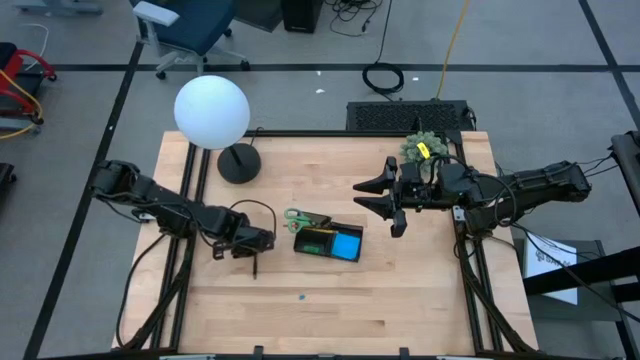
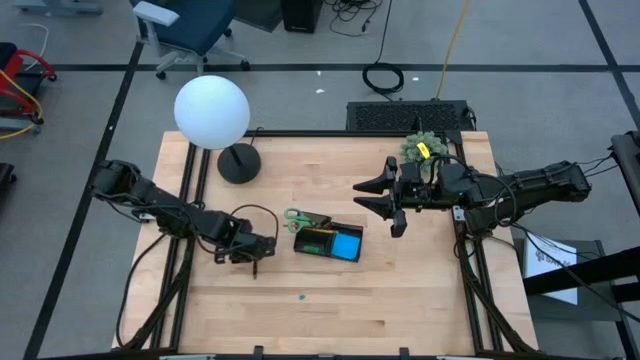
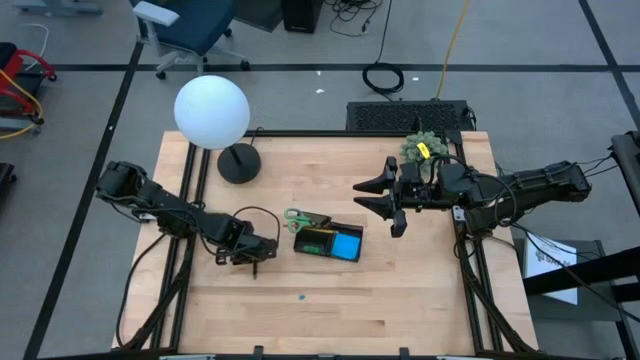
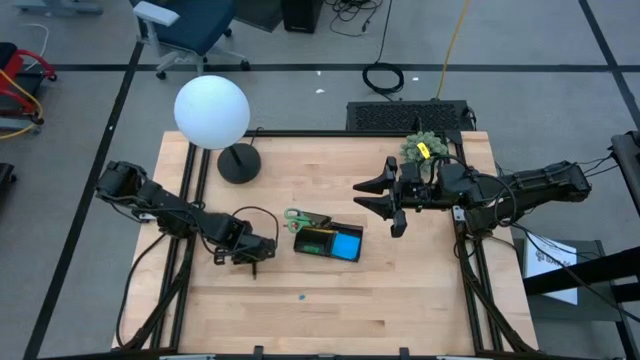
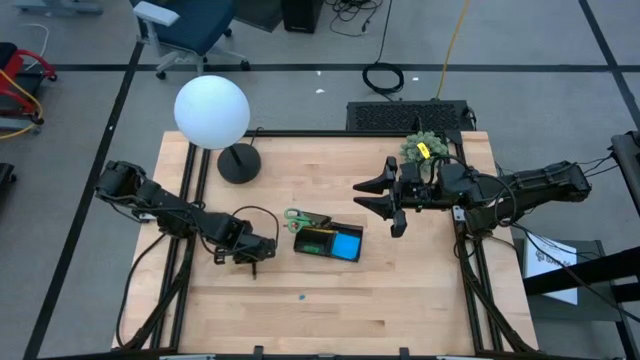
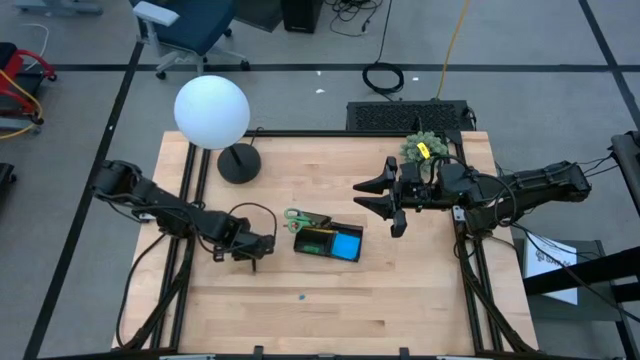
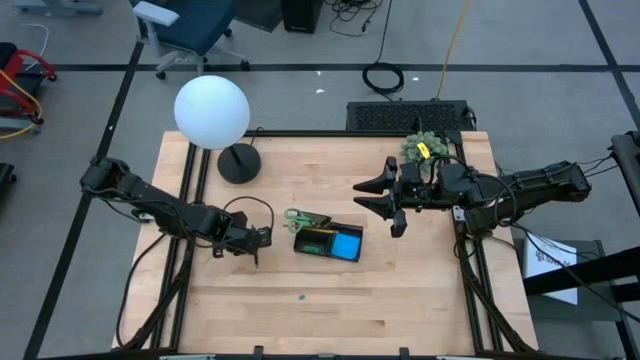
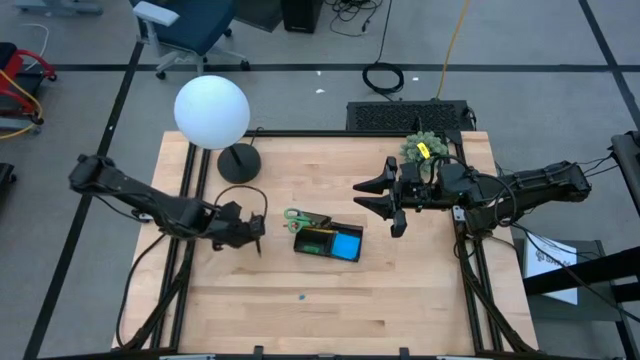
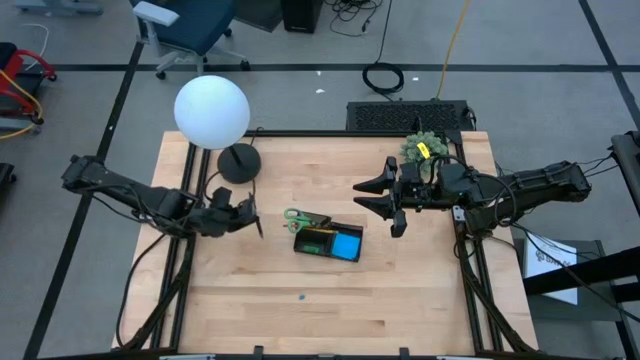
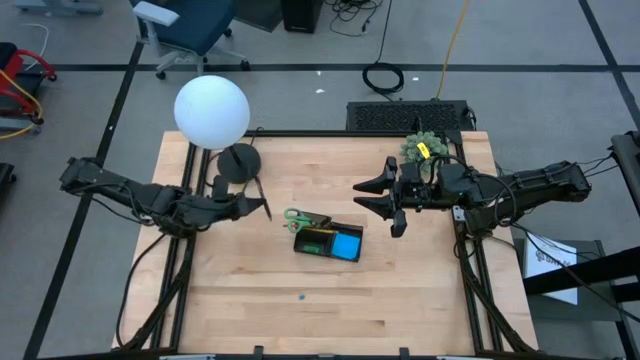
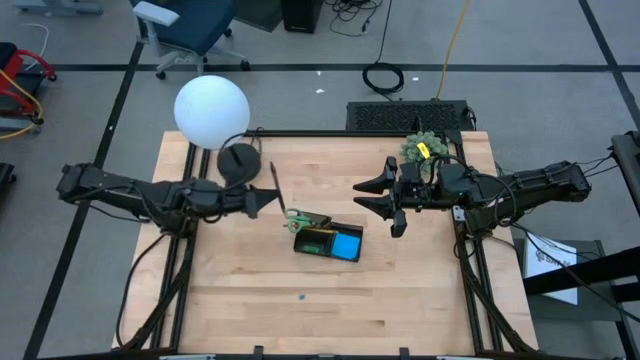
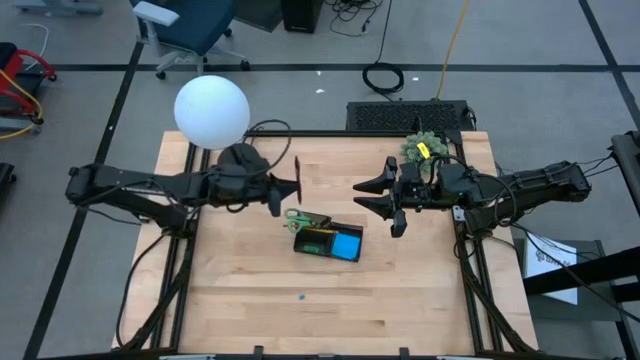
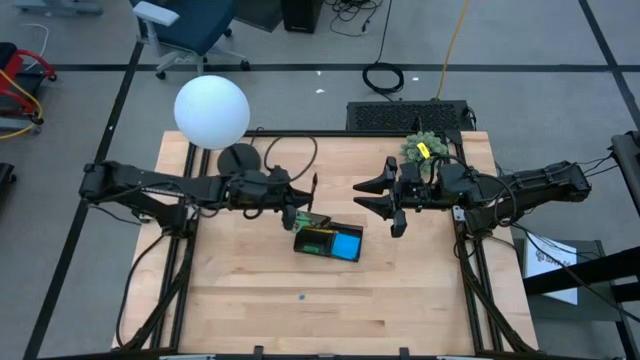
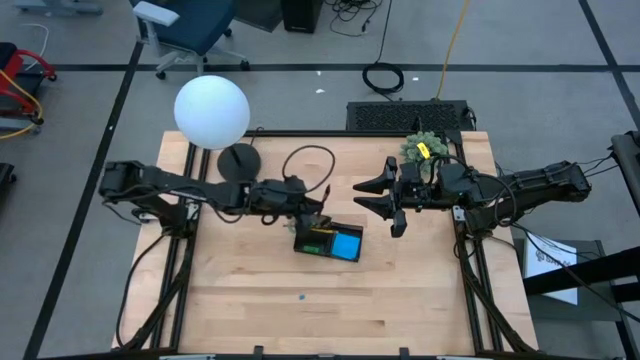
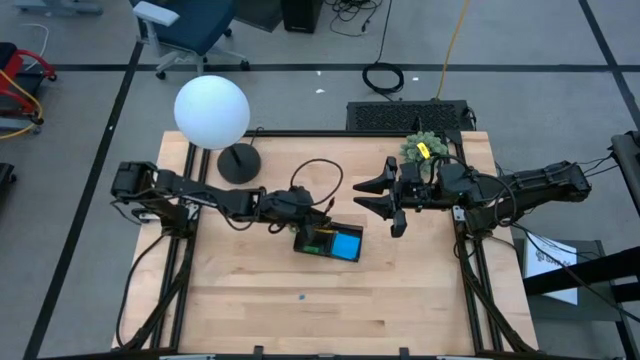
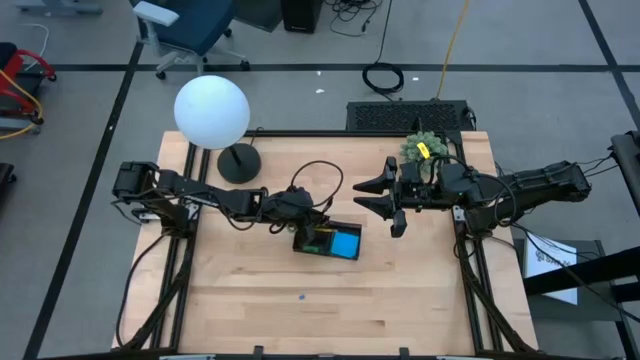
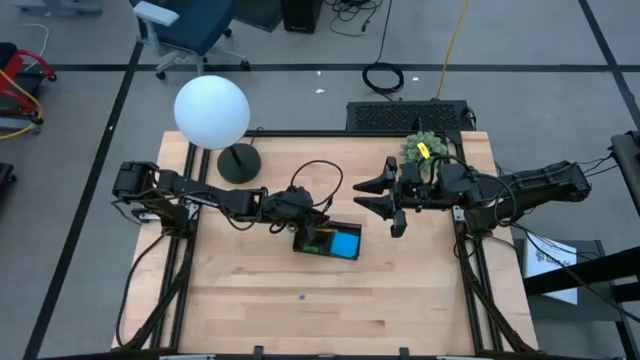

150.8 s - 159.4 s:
Task: Pick and place office supplies into organizer
Put the black pen into the desk organizer

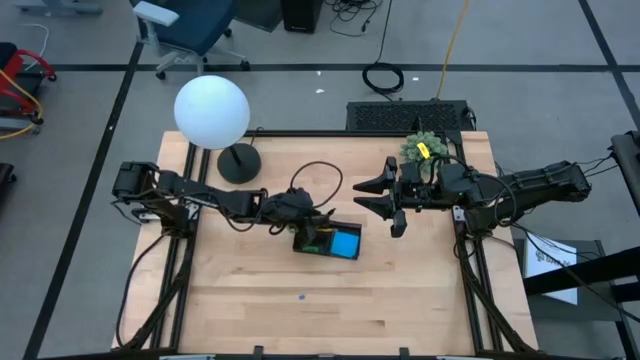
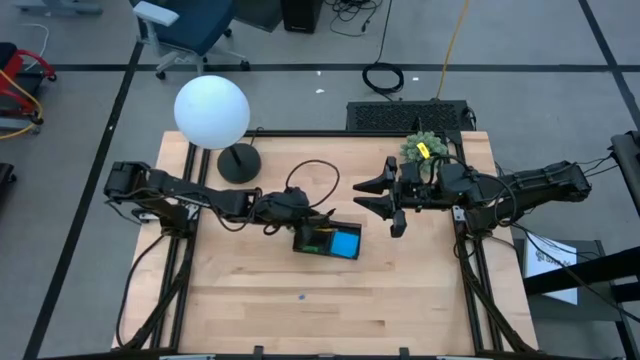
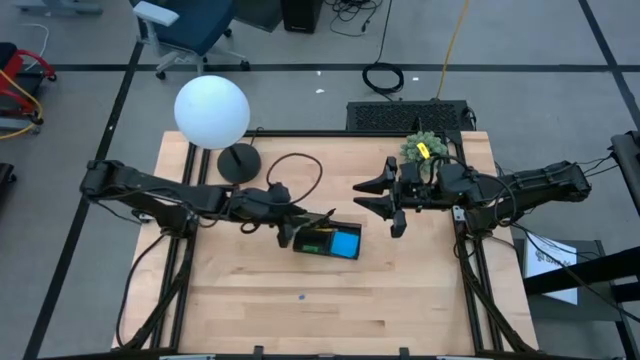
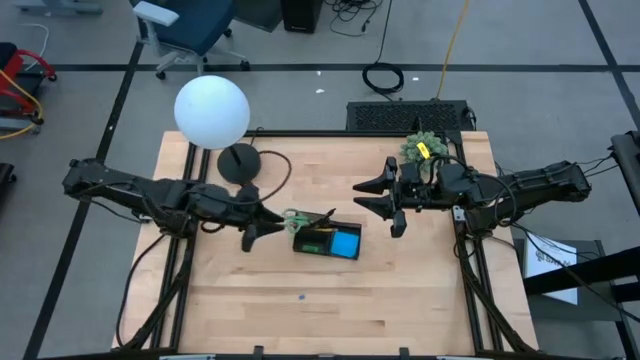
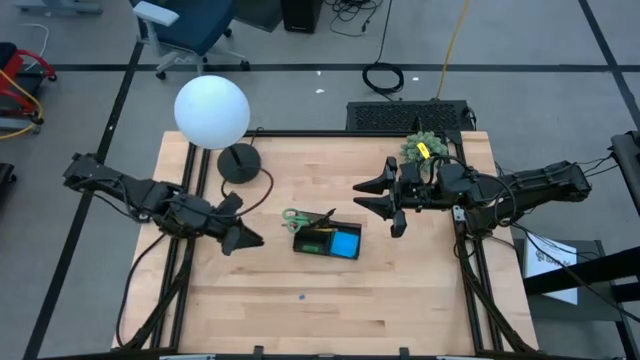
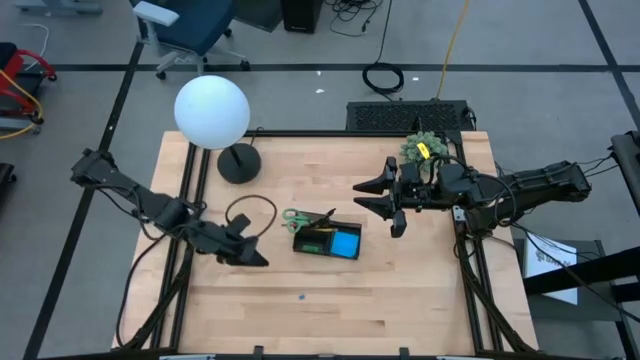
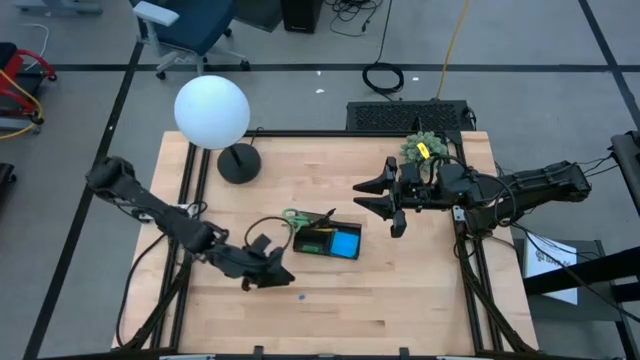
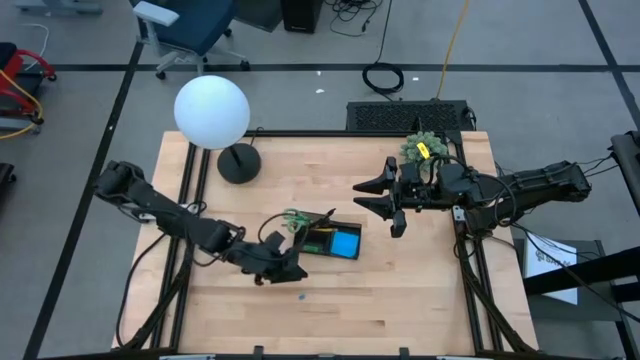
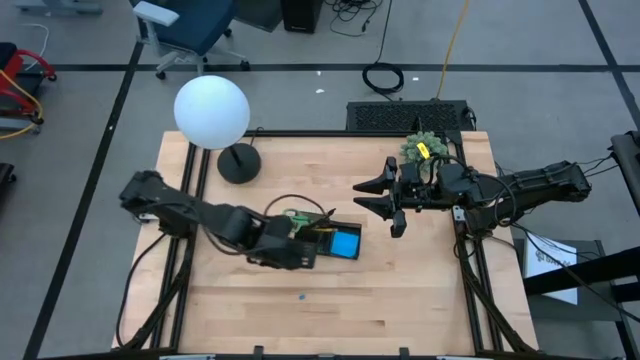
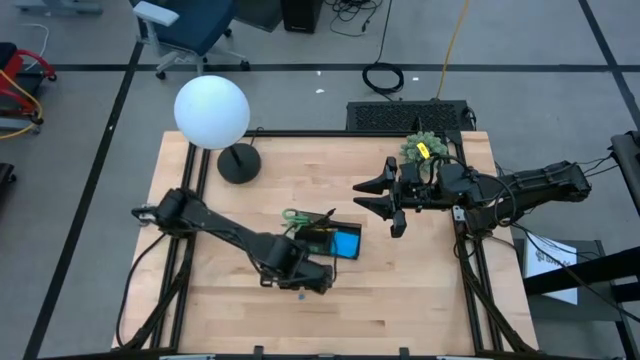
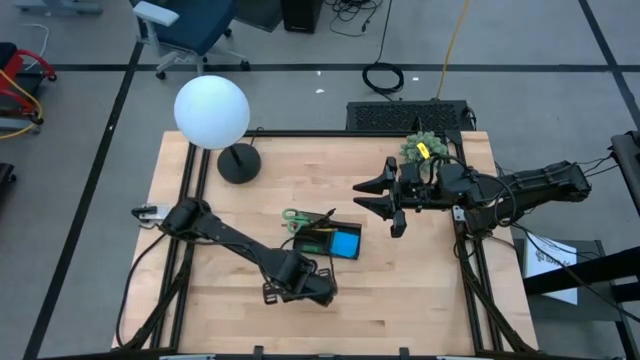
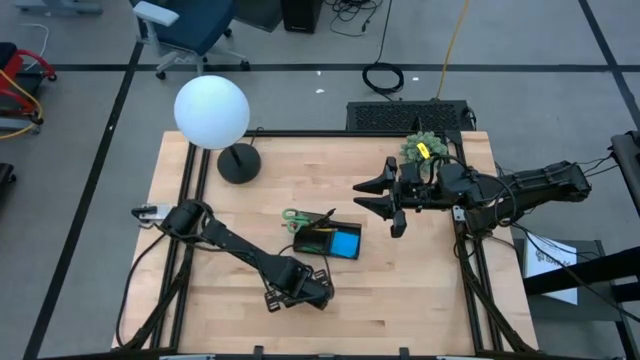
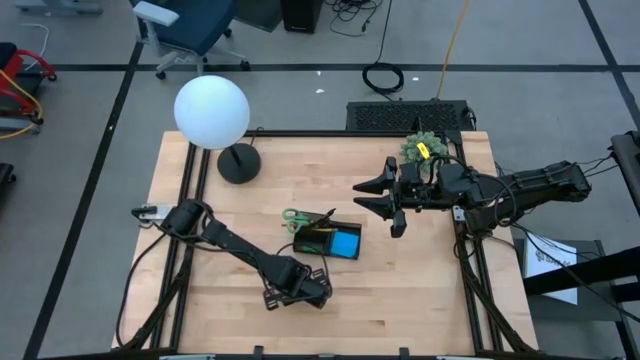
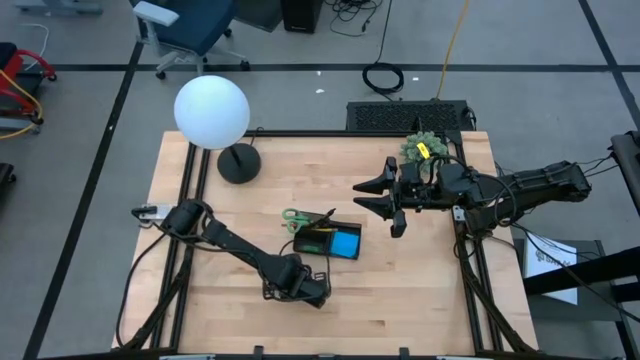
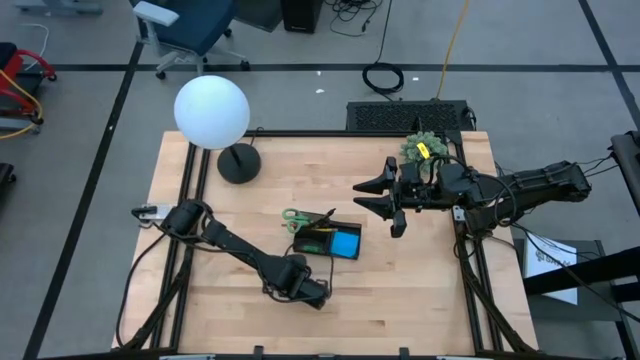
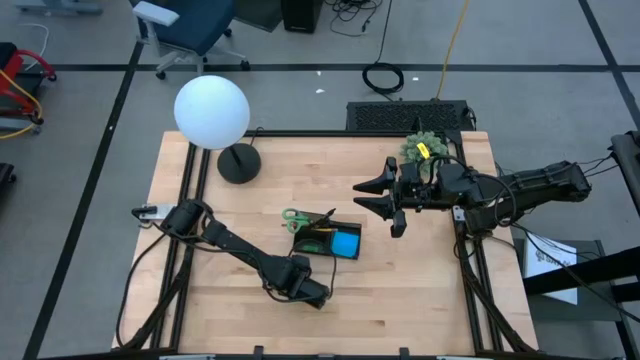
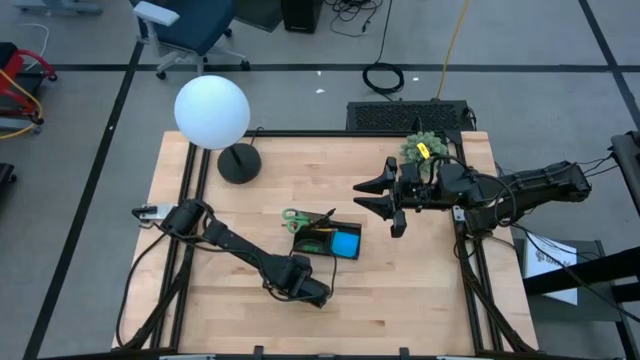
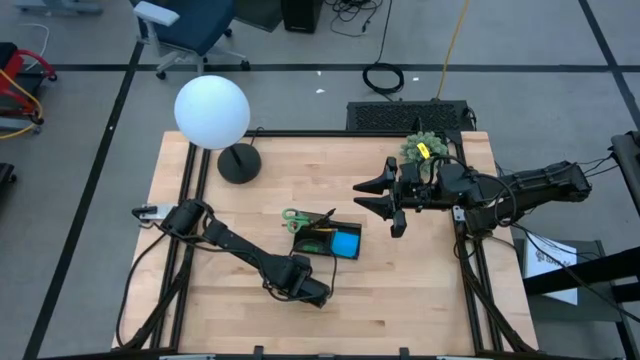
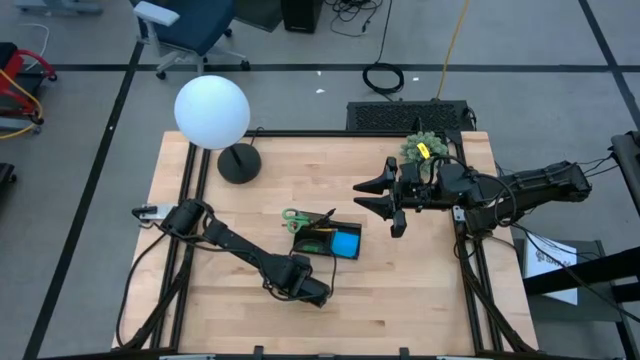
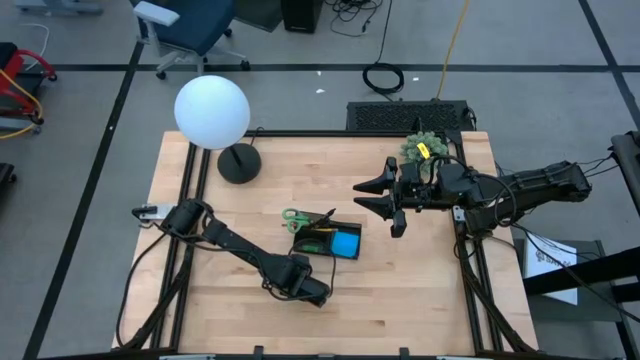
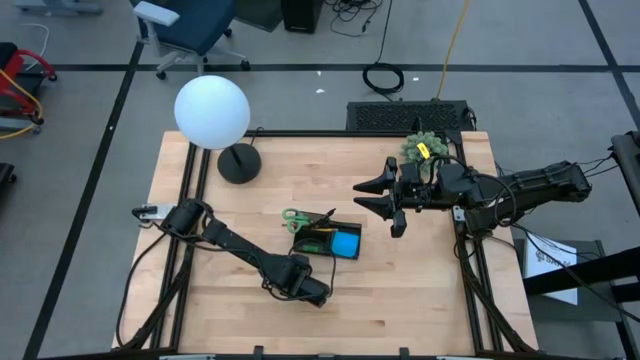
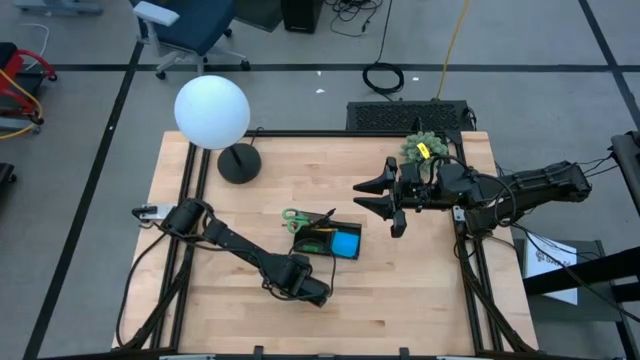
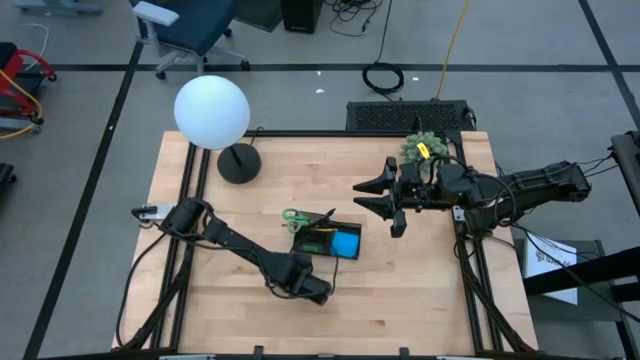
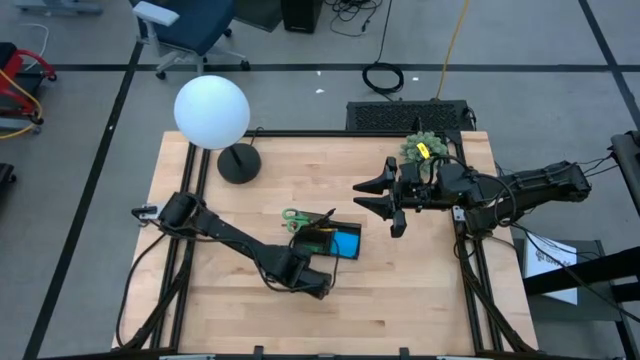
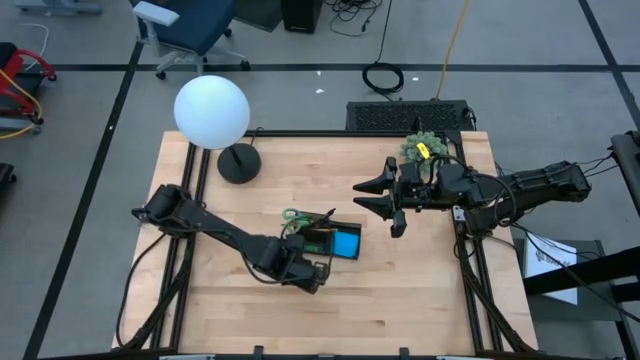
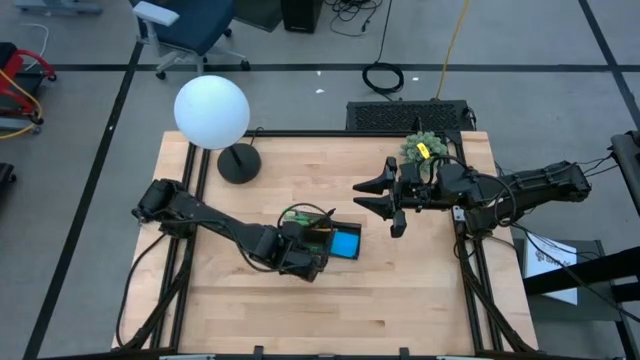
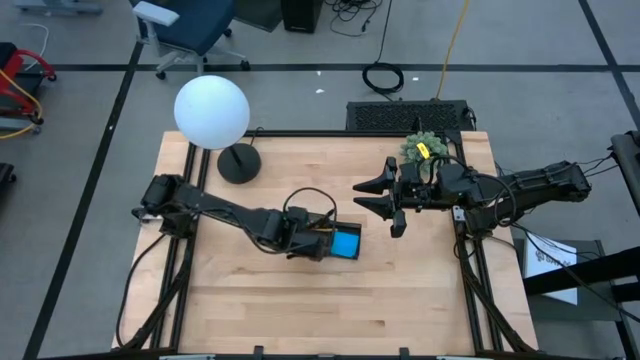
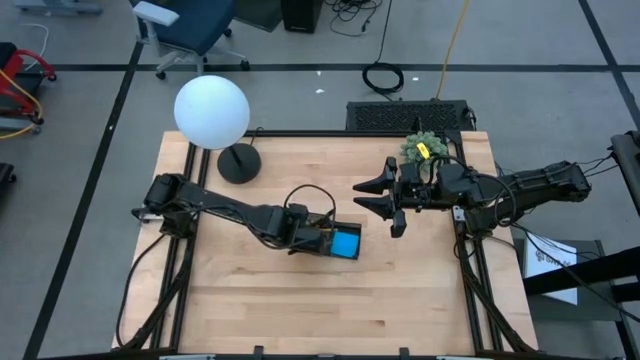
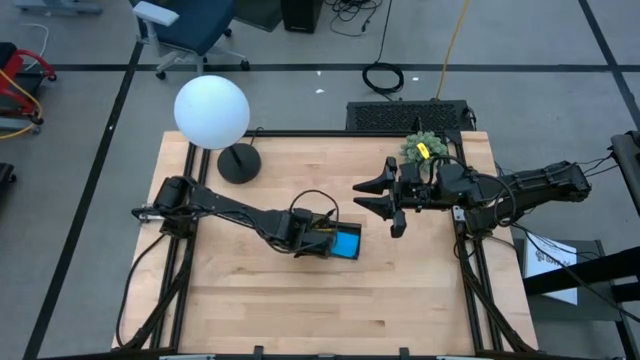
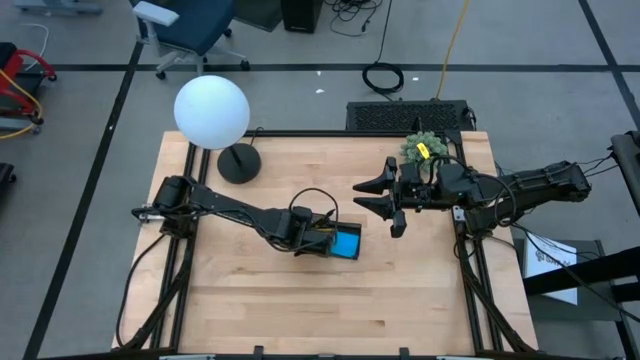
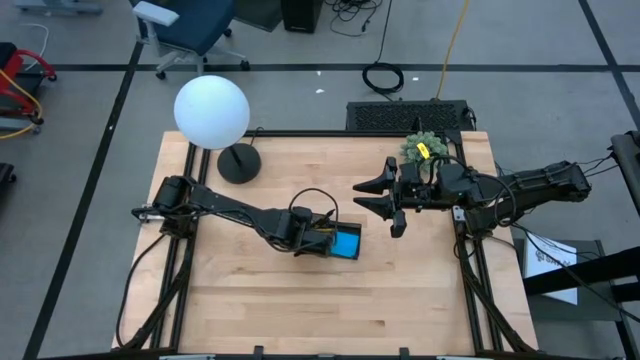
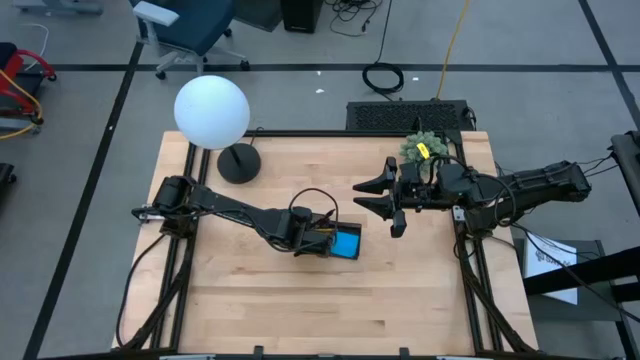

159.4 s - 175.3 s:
Put the blue binder clip into the desk organizer
